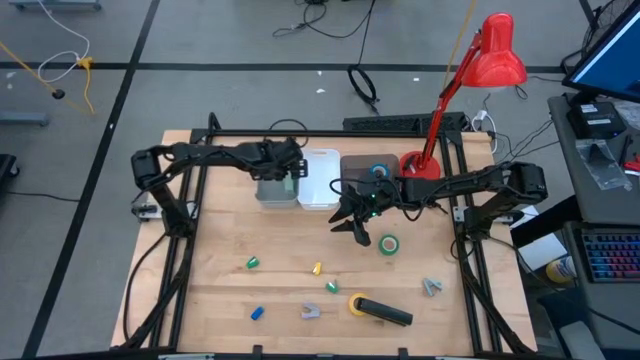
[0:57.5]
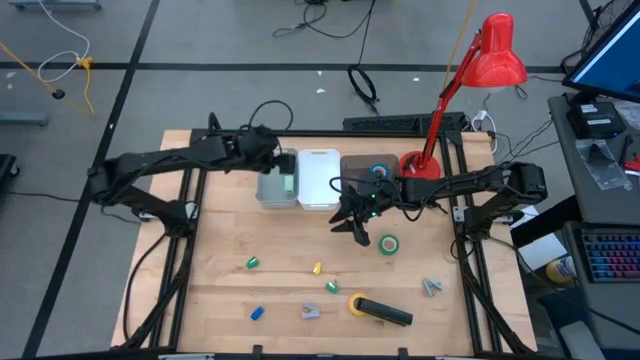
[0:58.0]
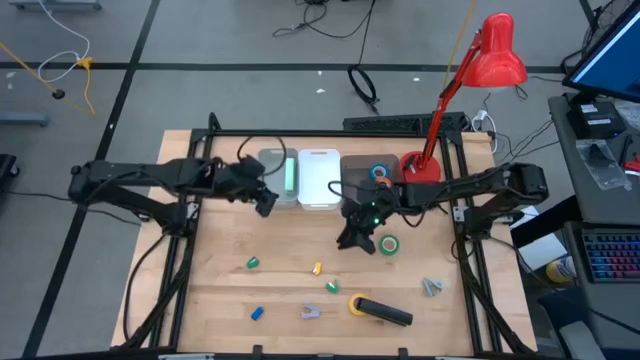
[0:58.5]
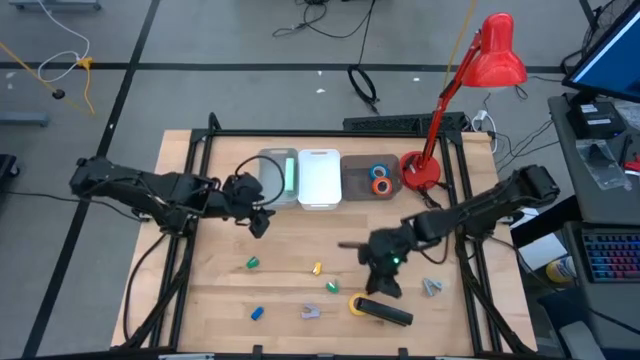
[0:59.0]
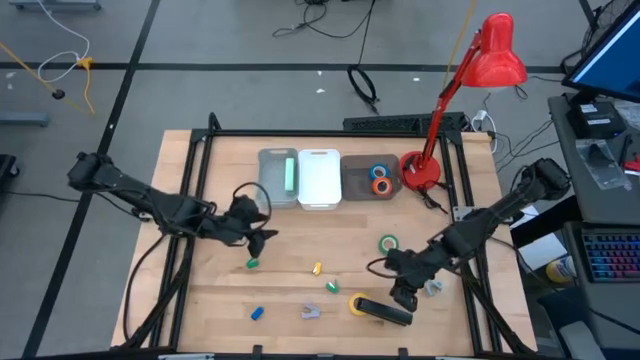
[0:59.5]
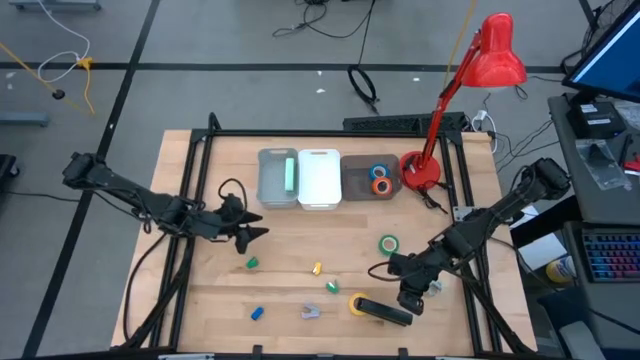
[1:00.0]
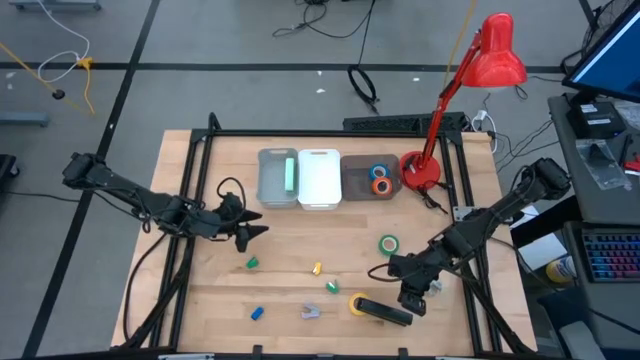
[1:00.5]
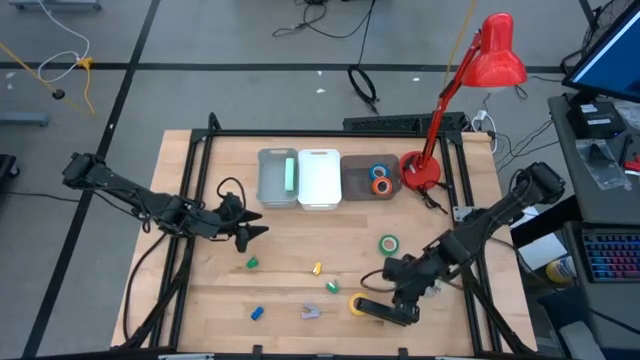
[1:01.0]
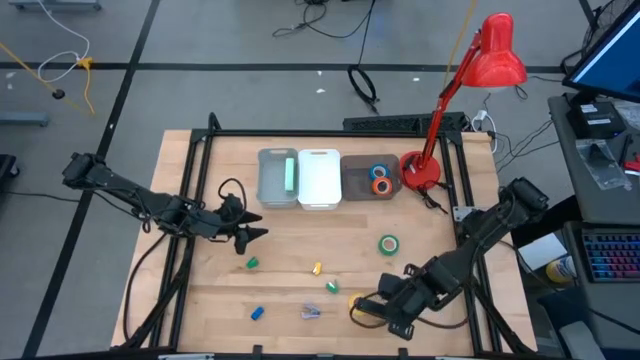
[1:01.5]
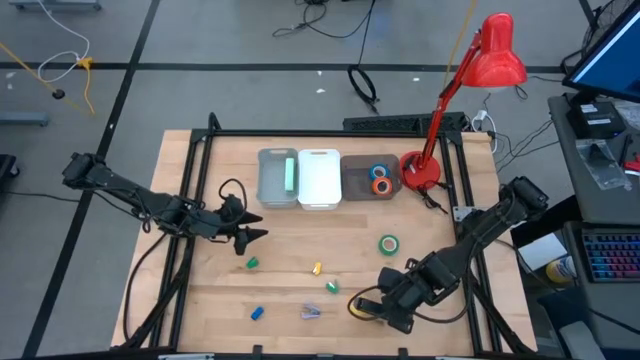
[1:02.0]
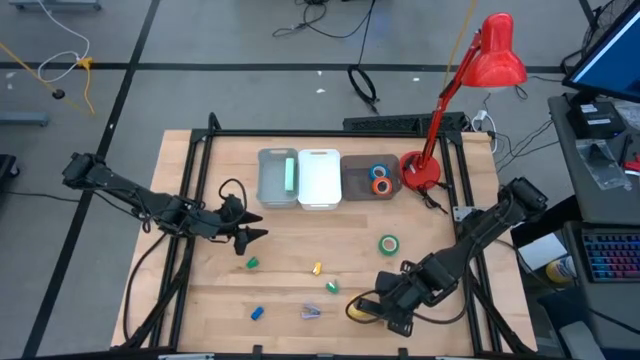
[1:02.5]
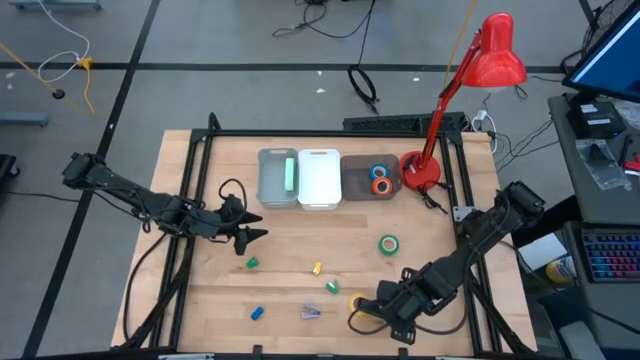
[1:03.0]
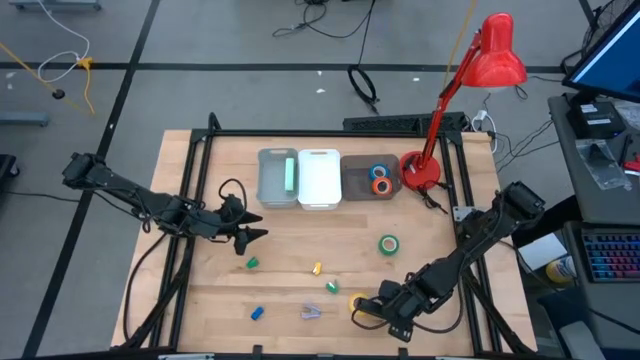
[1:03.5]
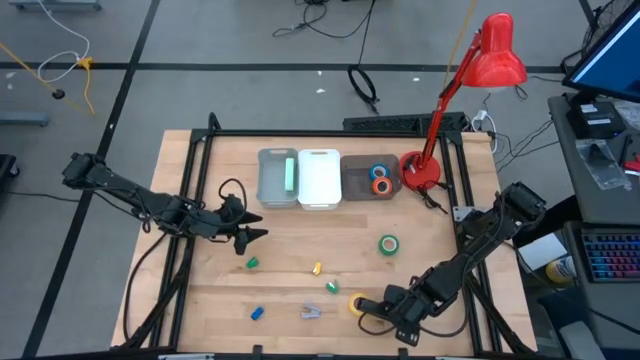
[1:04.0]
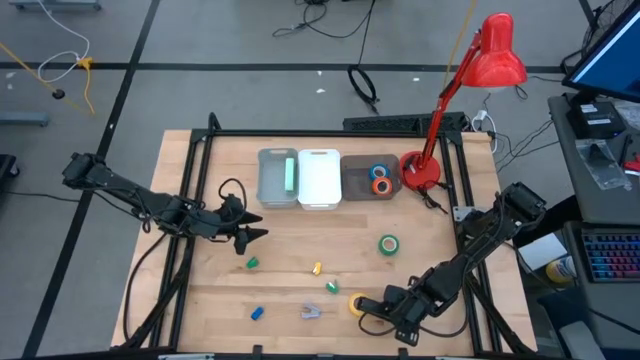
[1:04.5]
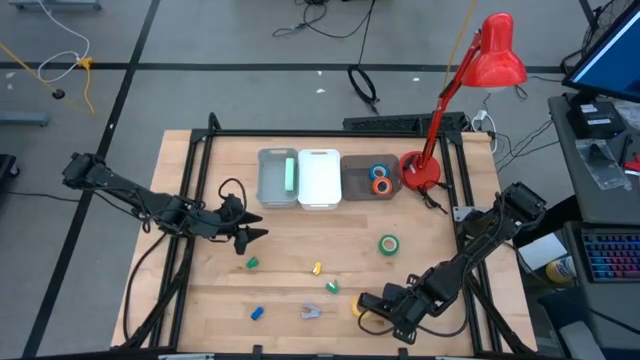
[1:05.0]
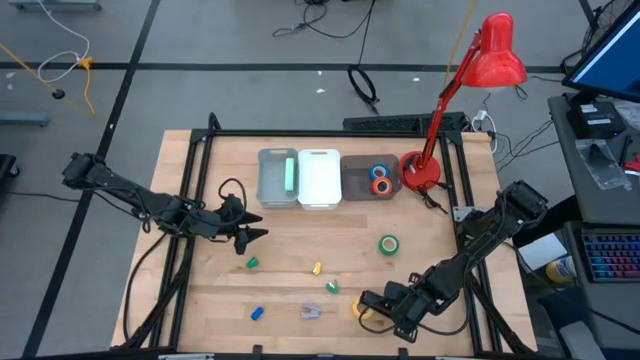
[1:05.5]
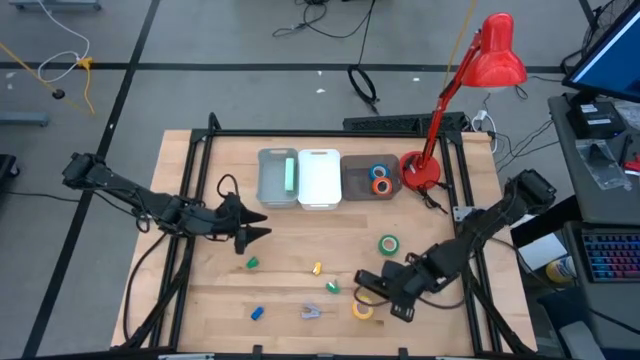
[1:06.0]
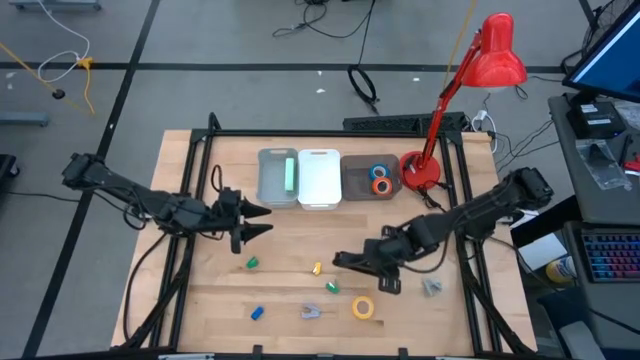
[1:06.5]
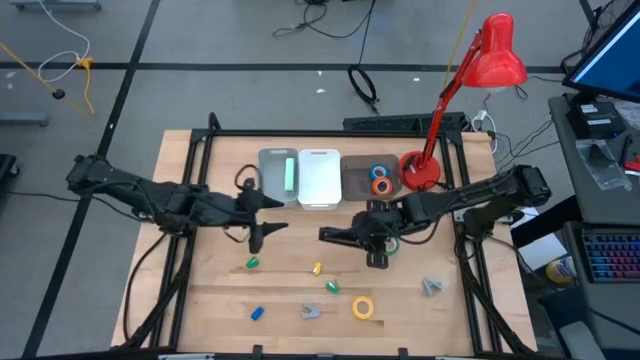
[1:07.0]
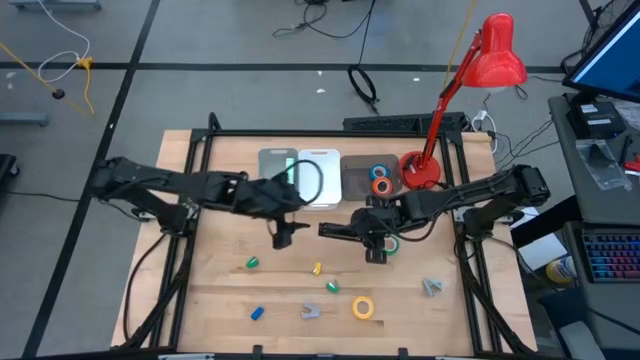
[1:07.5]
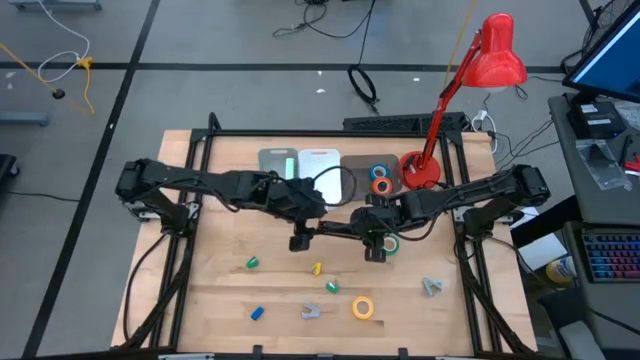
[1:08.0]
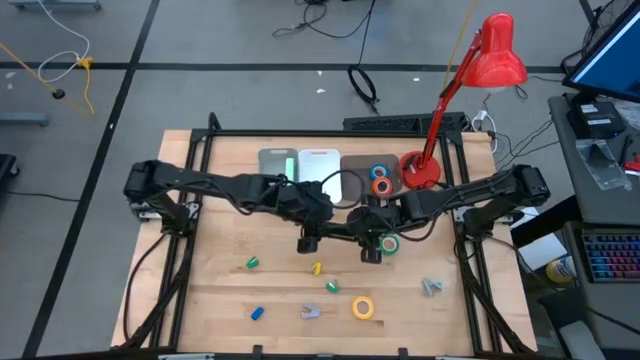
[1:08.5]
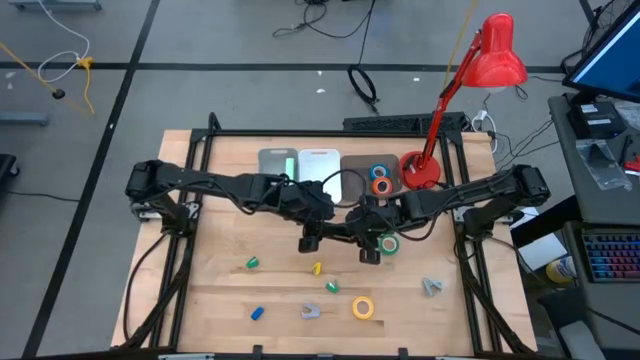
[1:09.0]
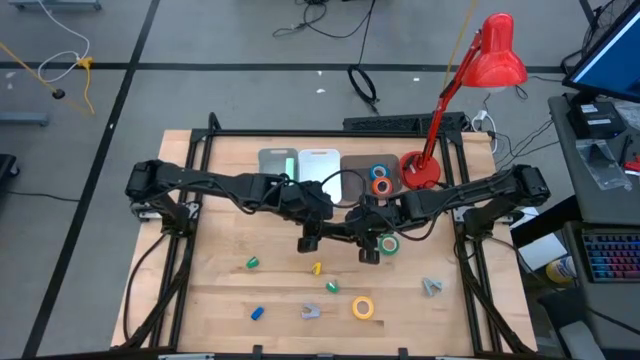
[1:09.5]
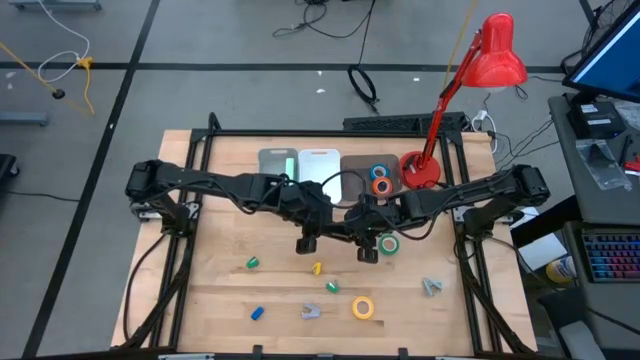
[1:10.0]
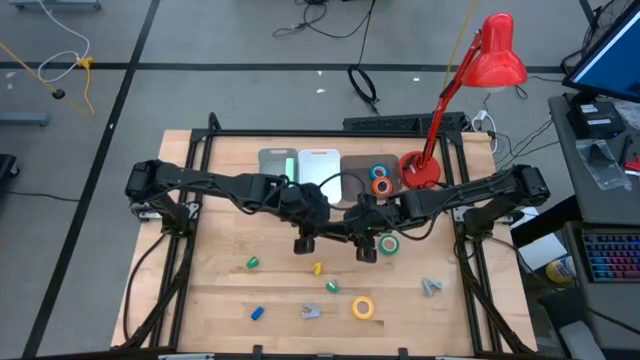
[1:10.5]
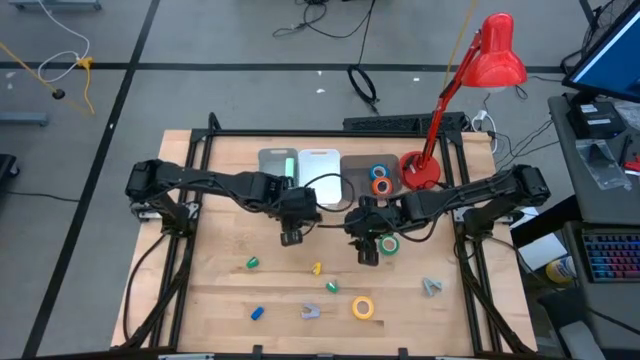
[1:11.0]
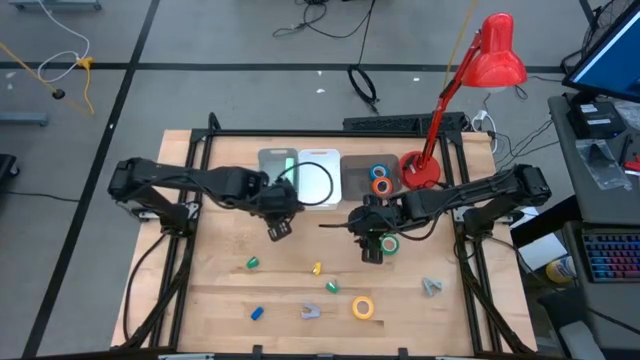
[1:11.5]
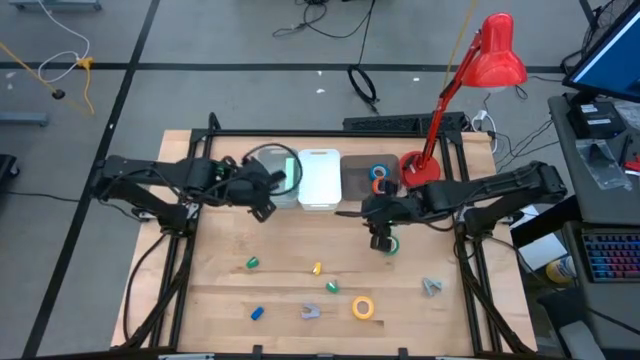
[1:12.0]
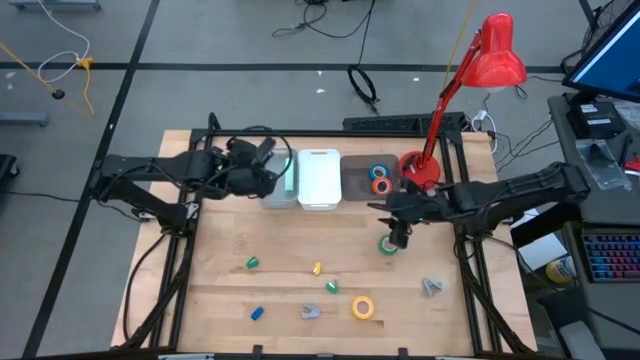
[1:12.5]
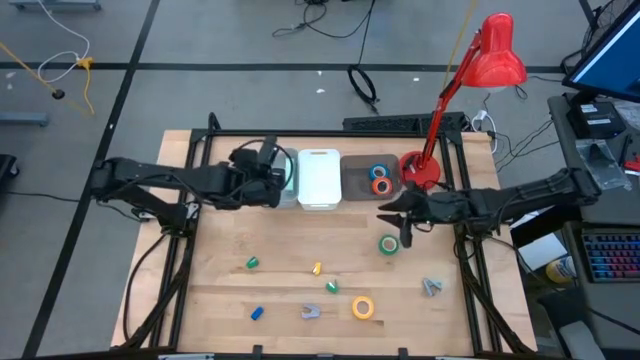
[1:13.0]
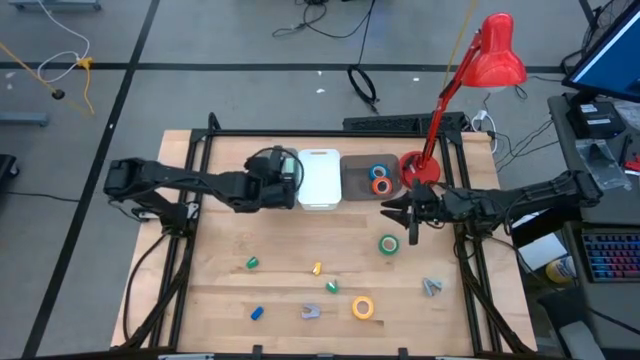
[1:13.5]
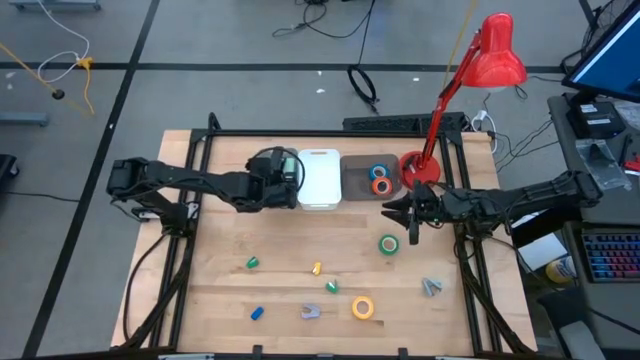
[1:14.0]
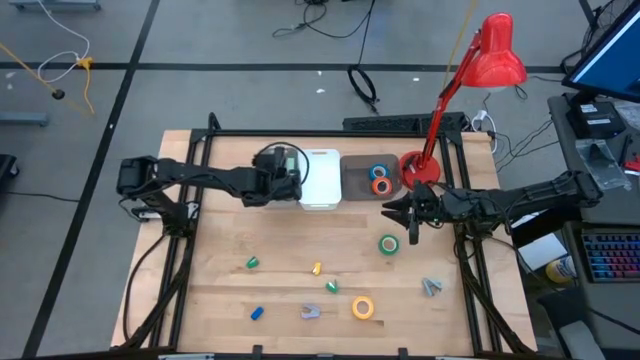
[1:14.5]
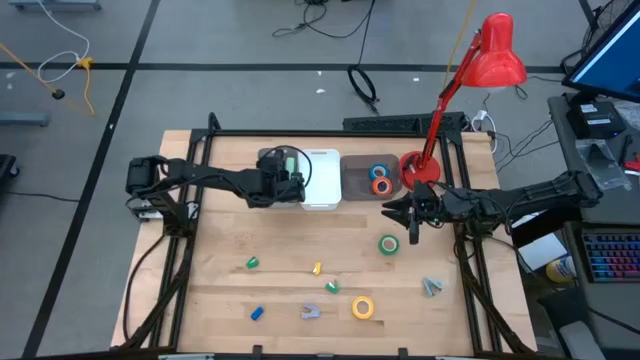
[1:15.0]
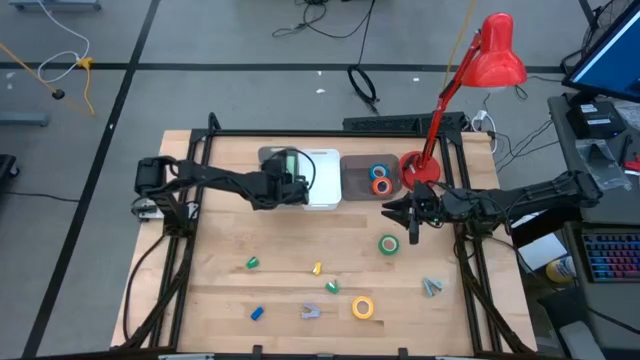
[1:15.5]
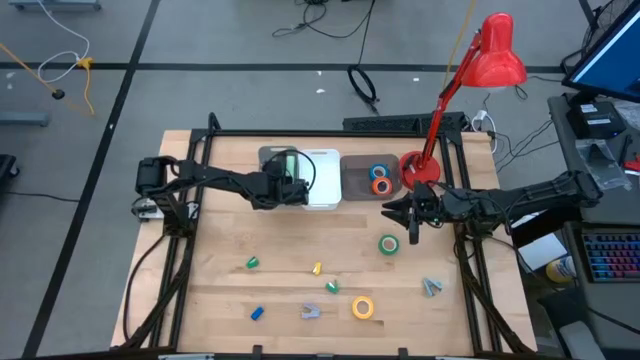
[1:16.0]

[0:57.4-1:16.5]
Task: Pick and place Stapler, Stapler remover, tape
Put the black stapler into the grey bin

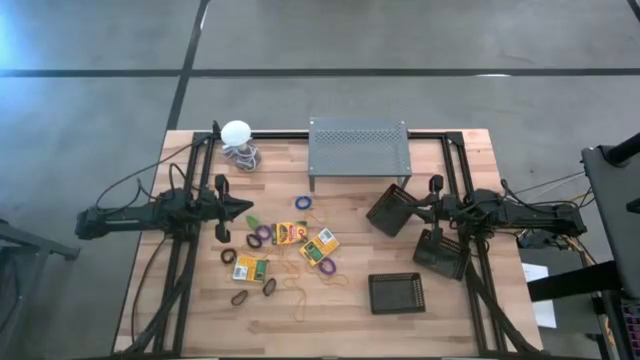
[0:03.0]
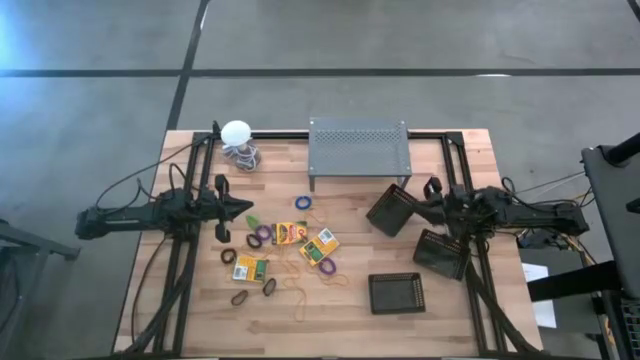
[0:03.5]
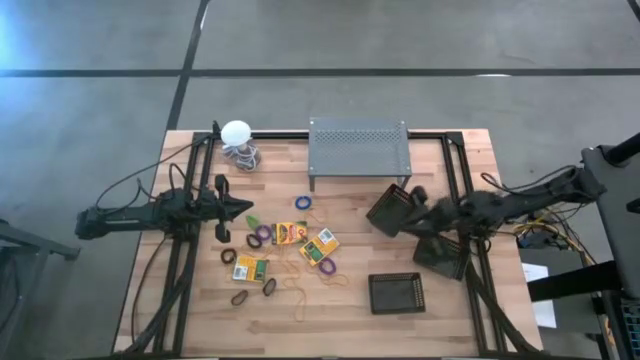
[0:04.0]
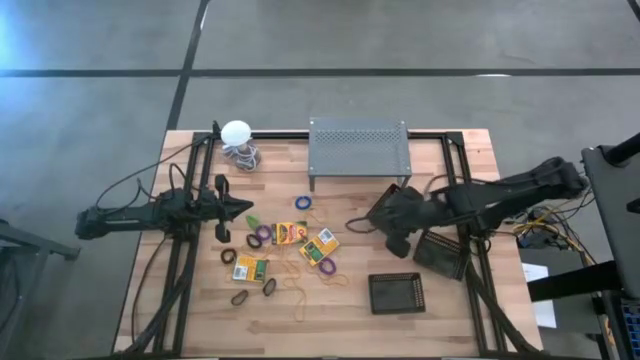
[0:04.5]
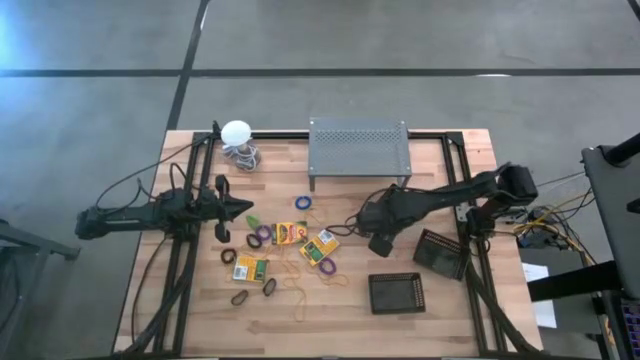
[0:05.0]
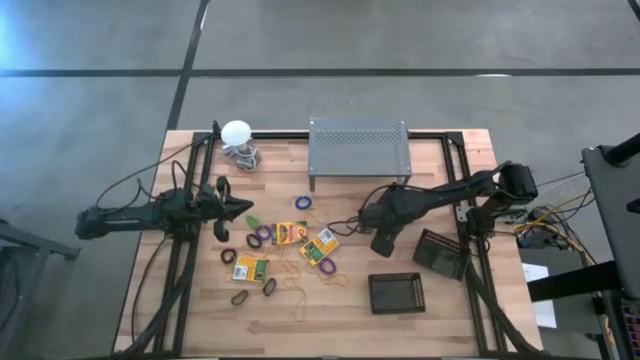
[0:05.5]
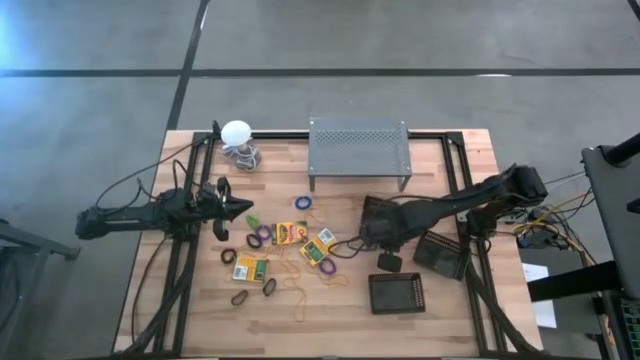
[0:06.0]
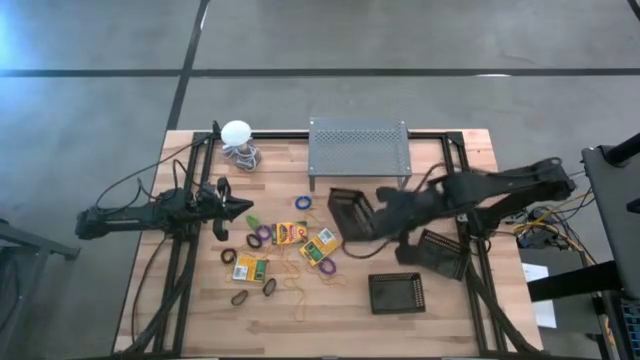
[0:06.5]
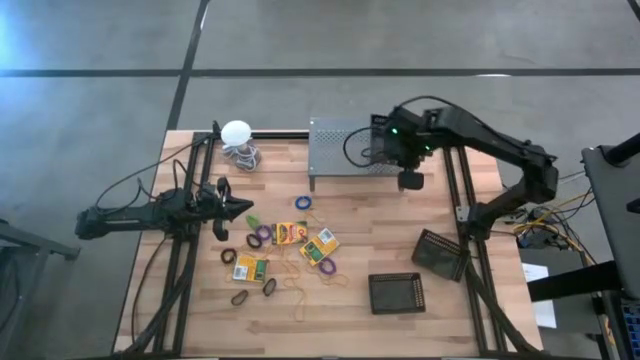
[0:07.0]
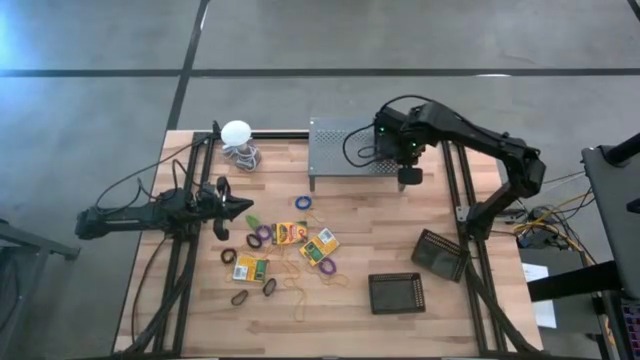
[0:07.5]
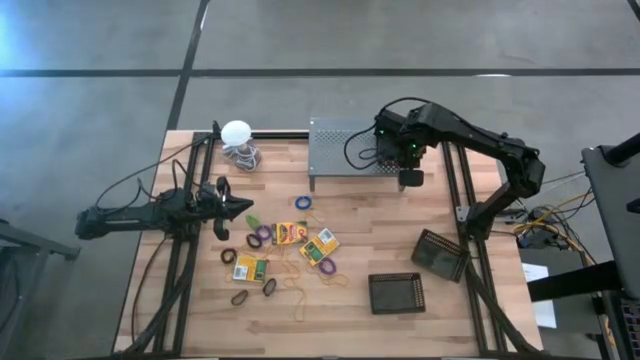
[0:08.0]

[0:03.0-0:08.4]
Task: Pick & Place Office Desk Supplies
Put the top black bin on the shelf
